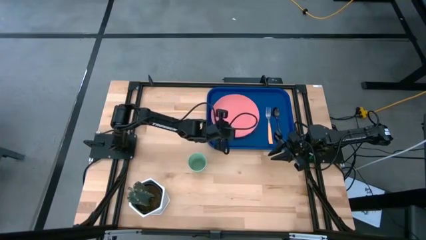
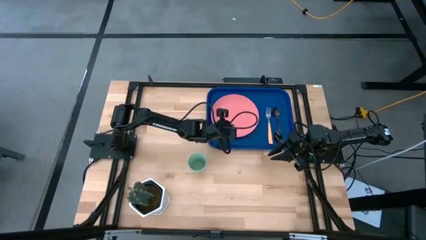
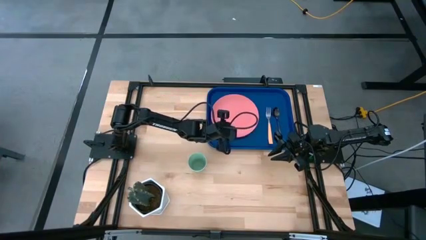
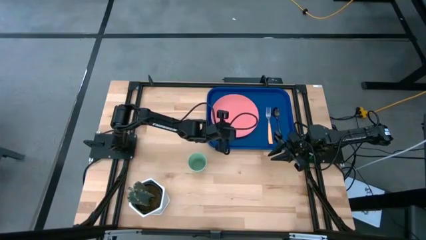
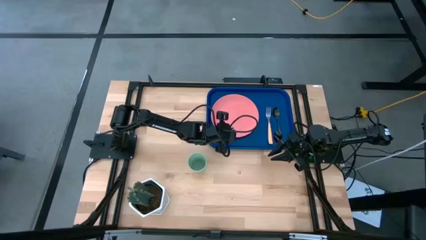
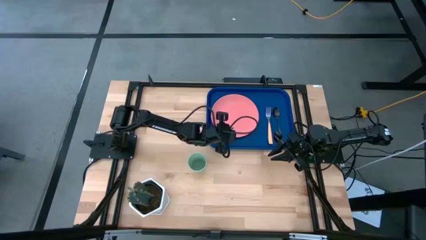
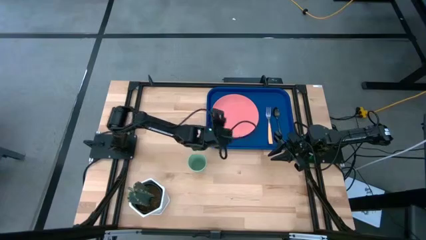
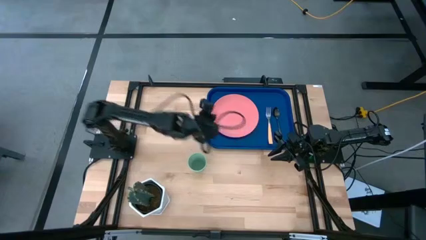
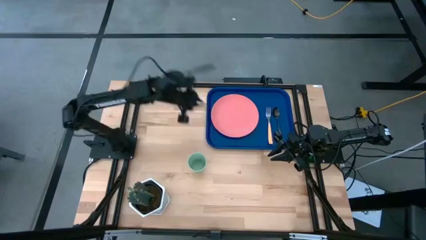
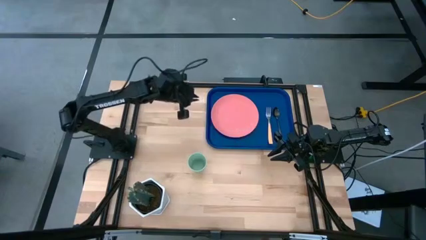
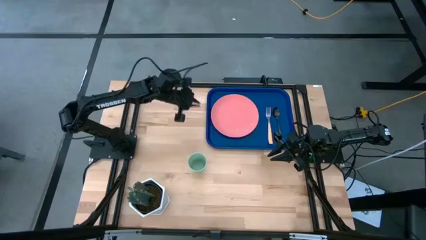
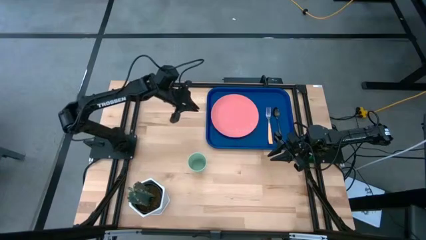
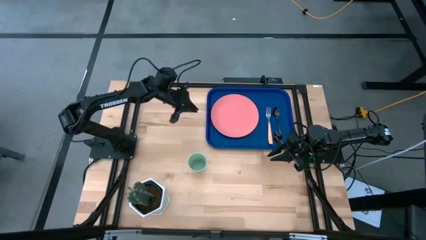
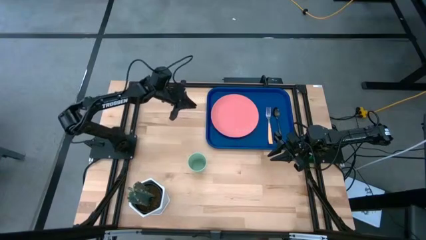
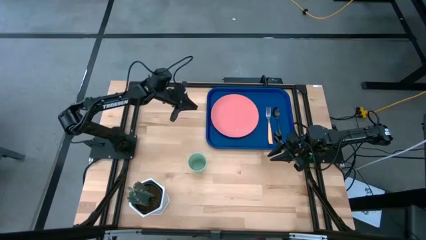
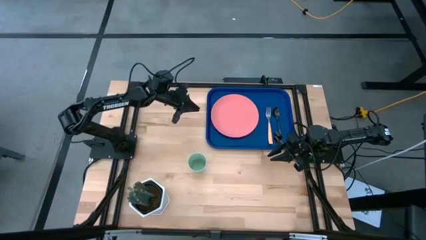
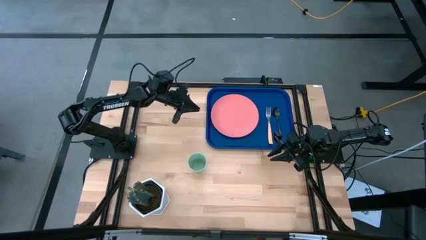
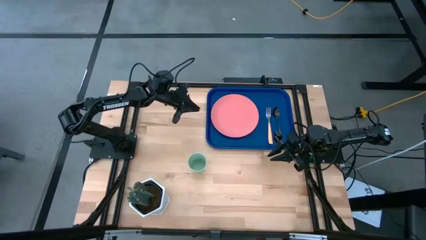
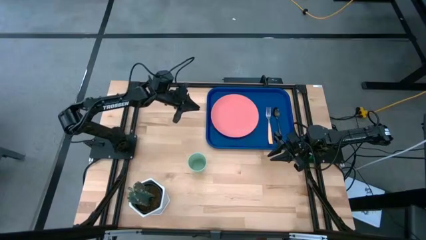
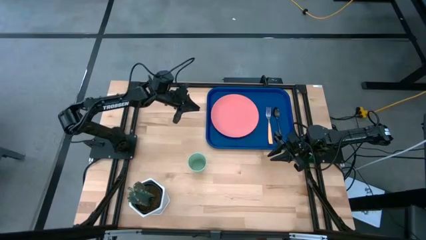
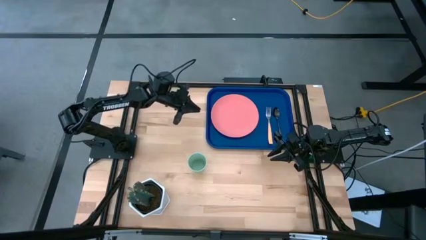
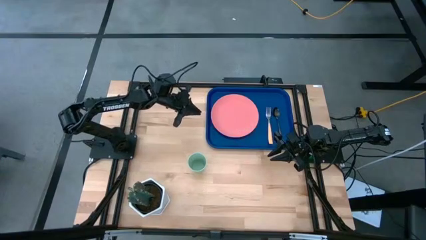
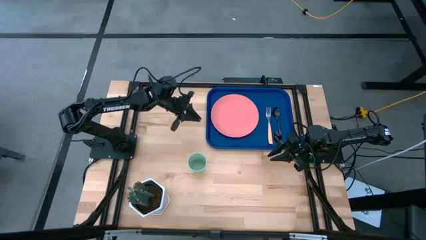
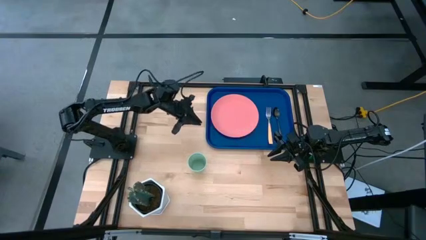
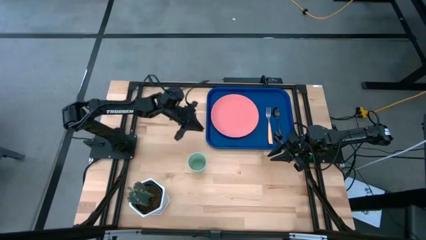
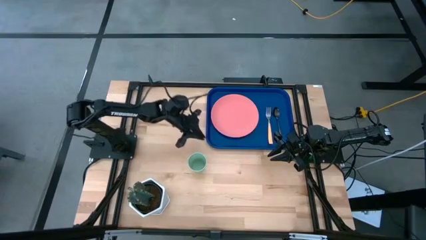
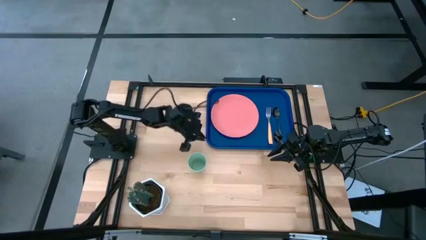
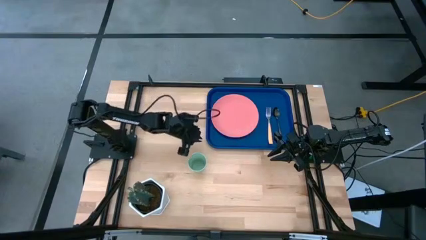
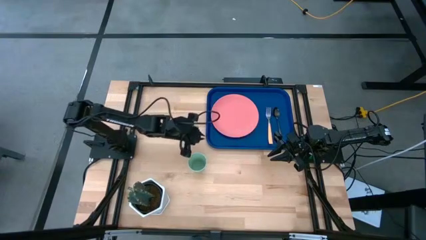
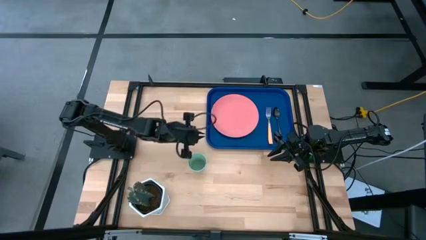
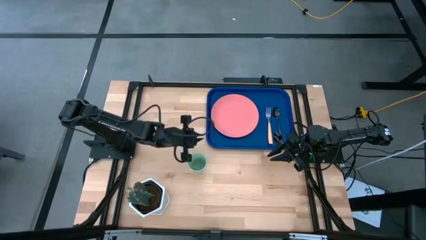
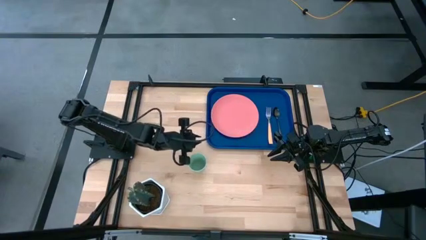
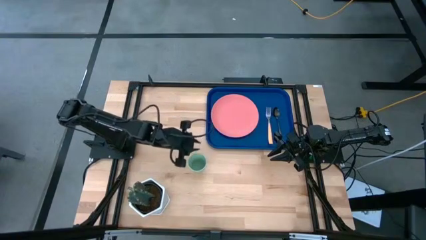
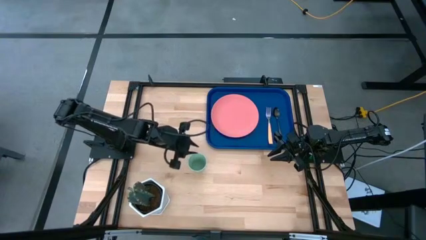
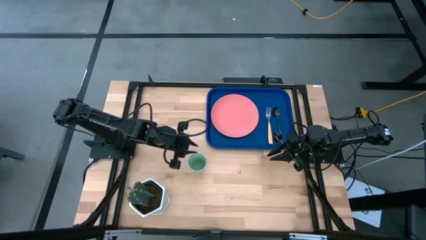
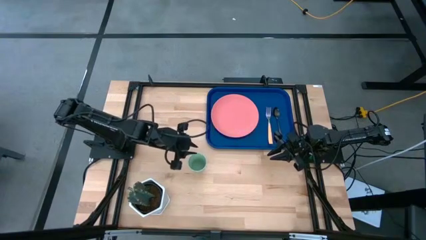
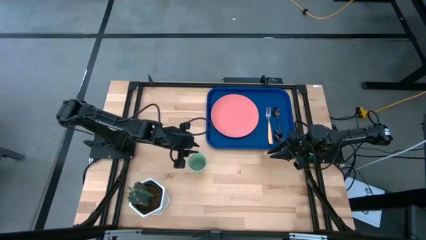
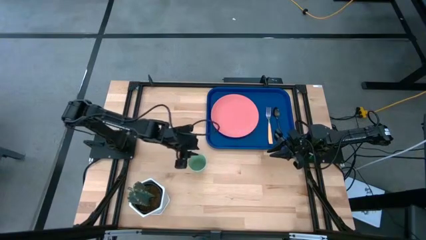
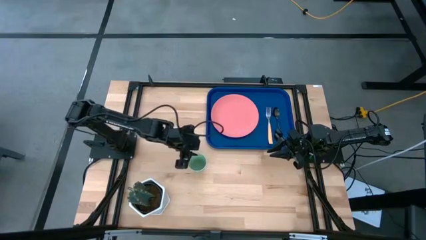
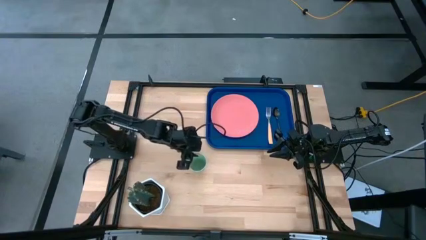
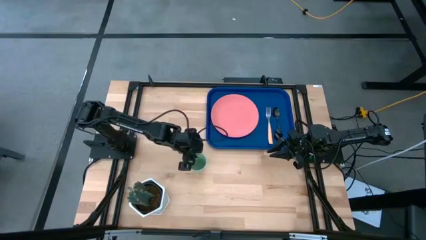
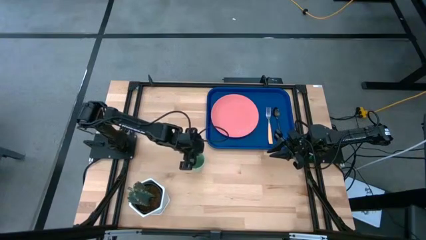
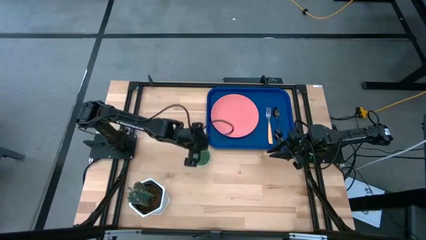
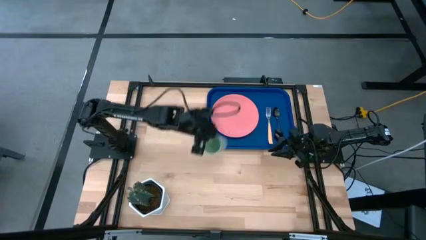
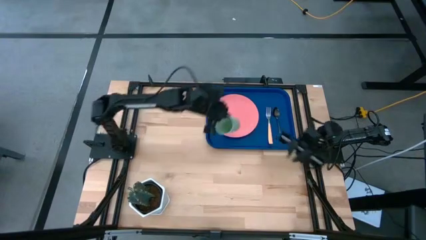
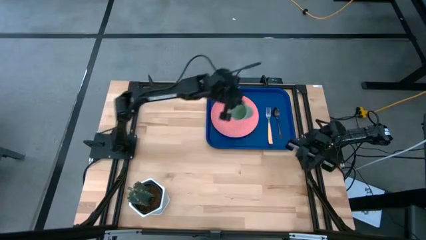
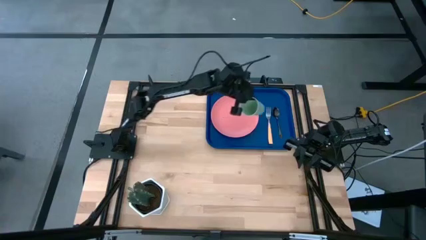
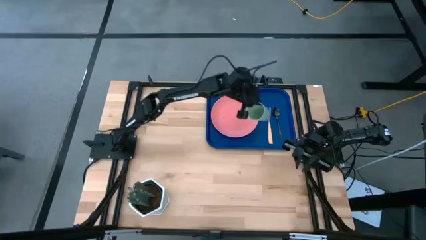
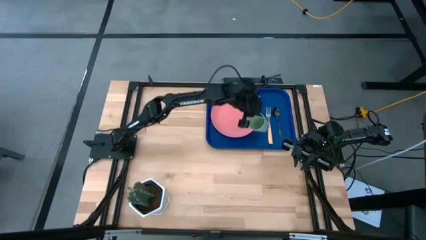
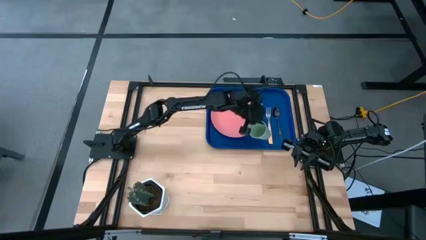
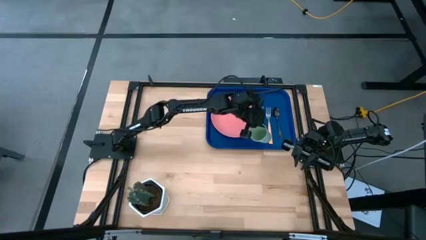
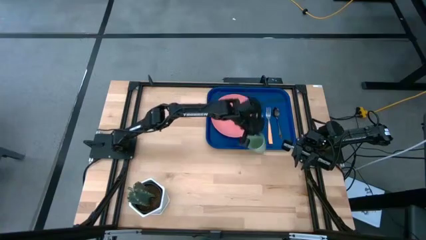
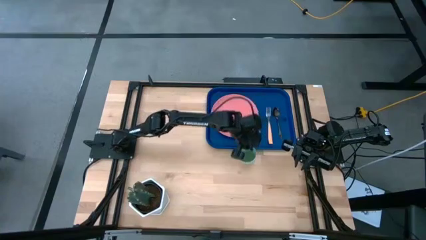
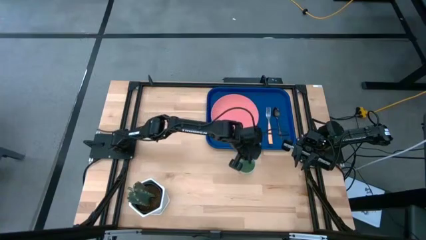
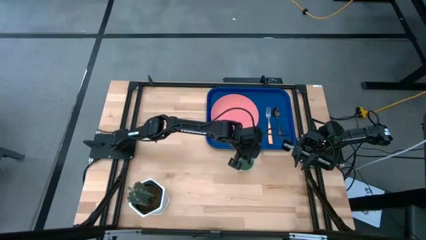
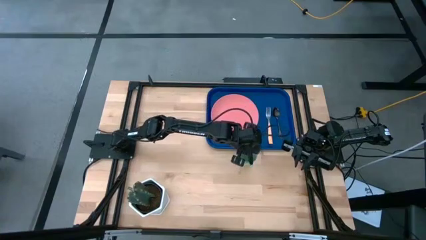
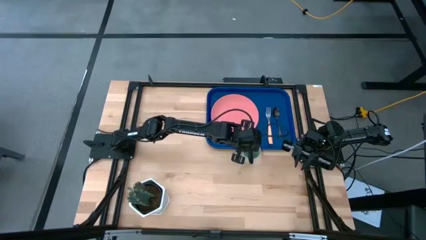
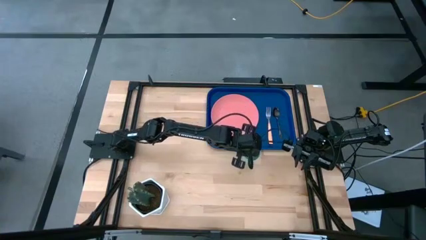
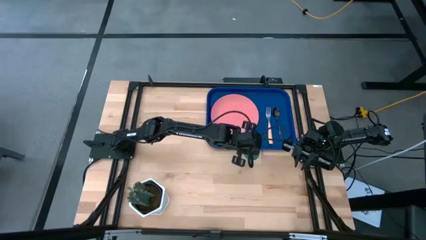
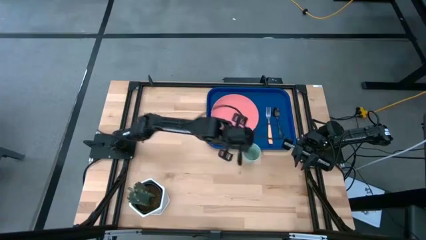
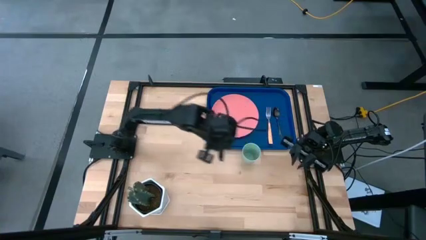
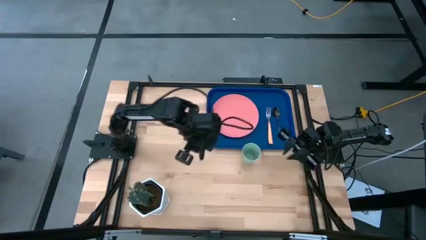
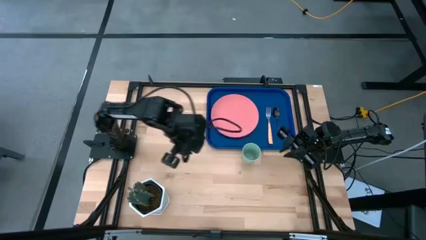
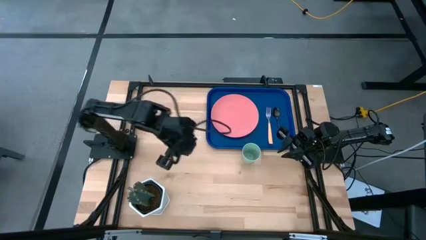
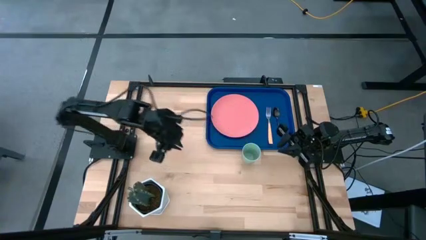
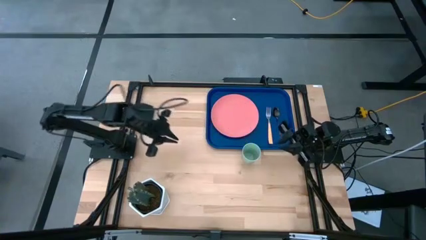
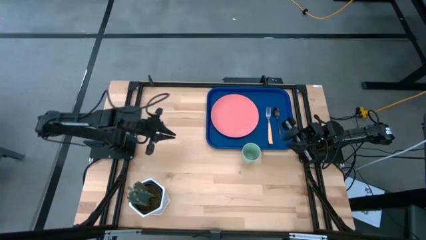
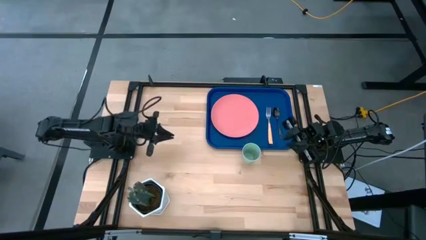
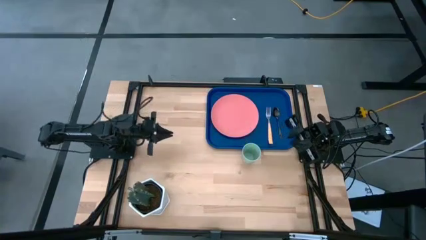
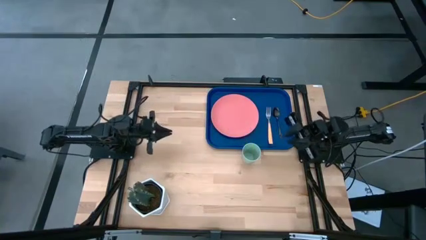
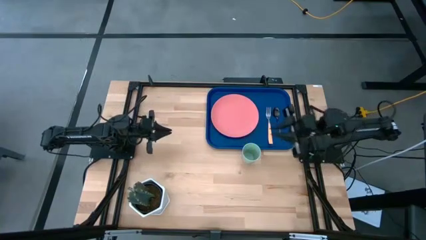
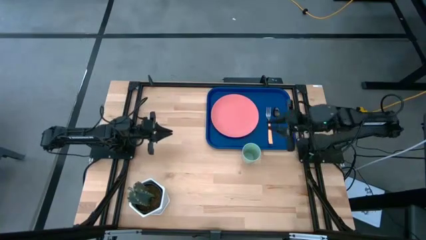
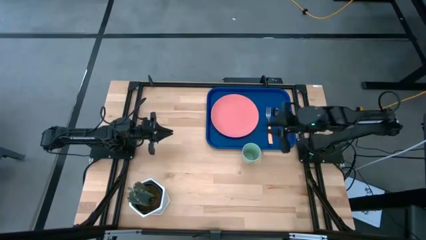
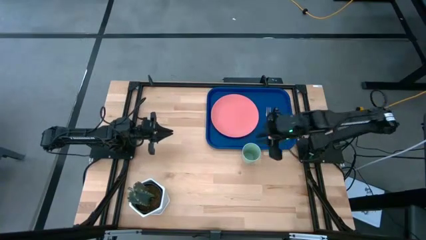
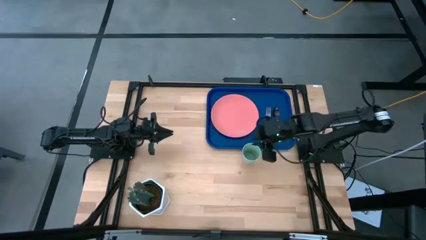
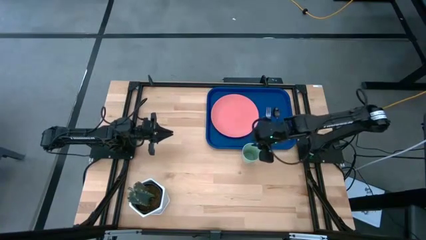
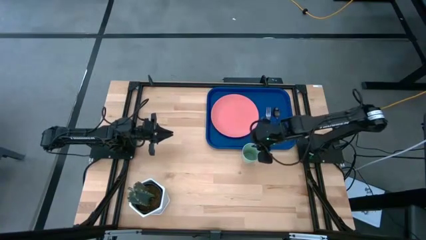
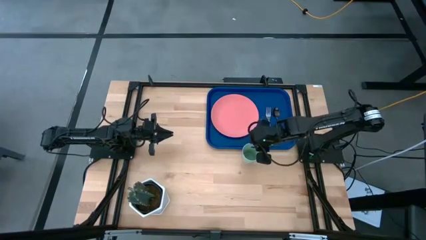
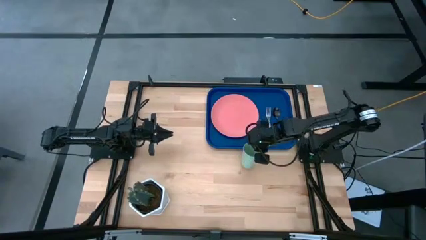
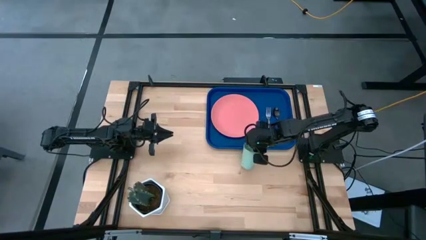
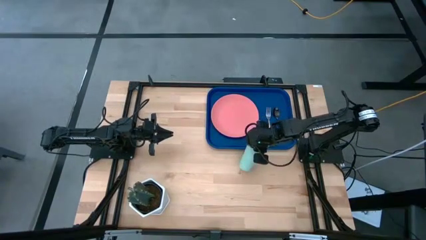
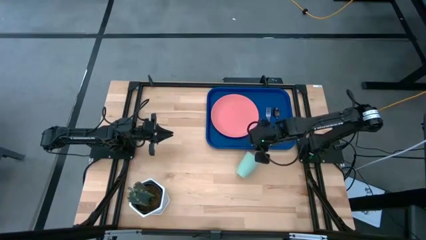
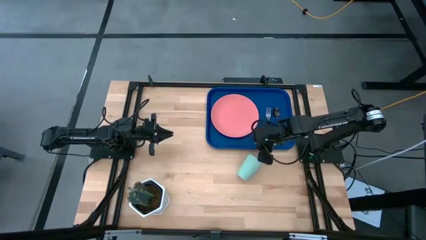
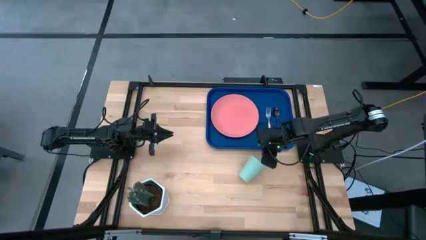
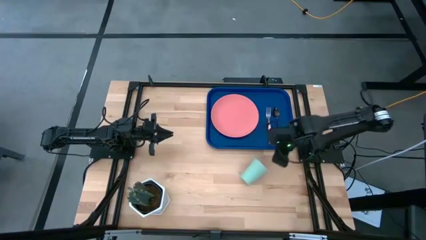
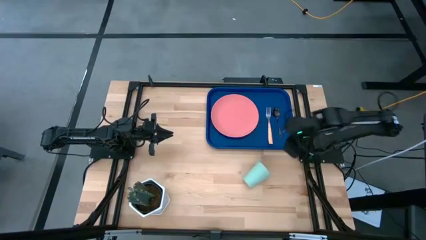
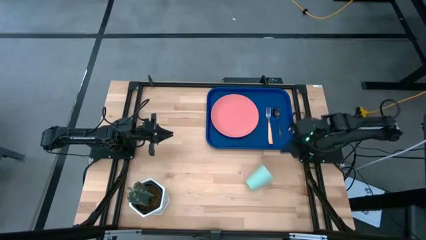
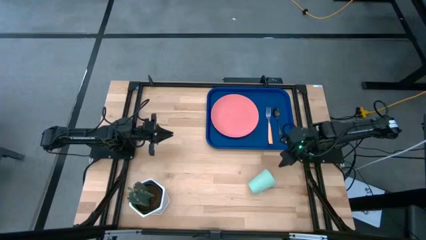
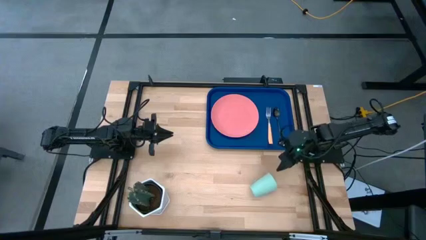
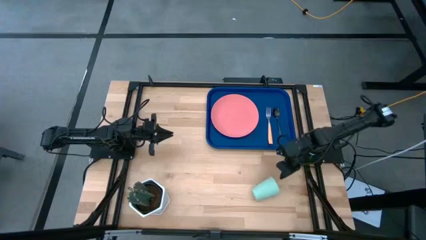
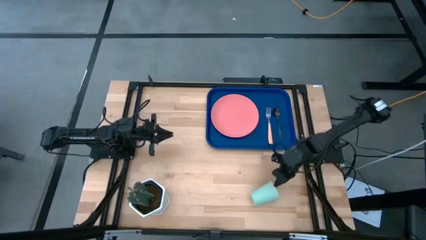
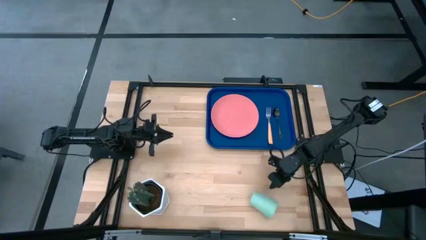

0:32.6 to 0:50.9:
Task: Pick and place plate/cup/fork/spoon on tray
Put the green cup on the dark blue tray to the top right of the pink plate
